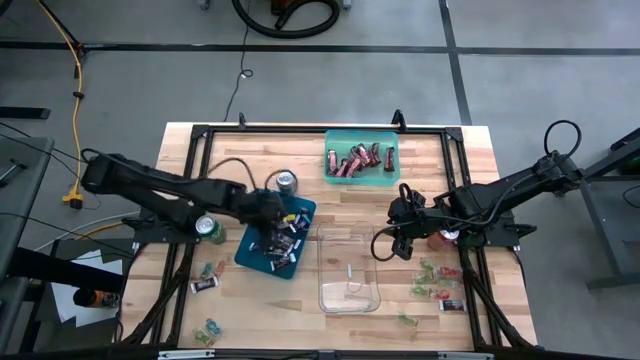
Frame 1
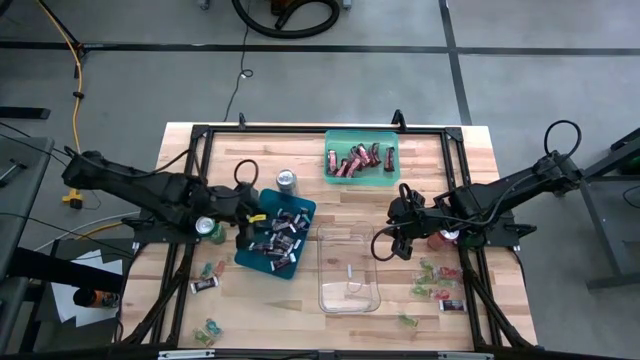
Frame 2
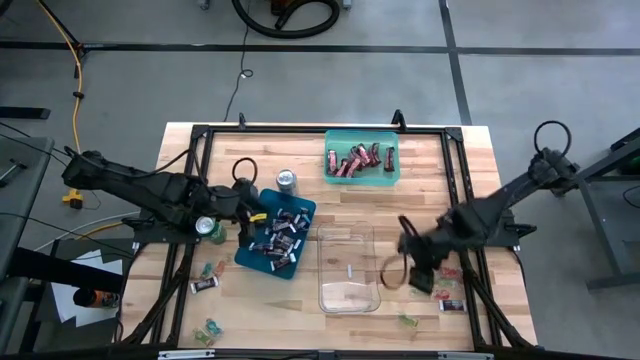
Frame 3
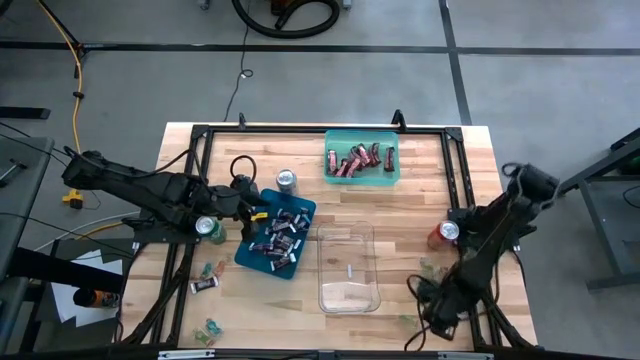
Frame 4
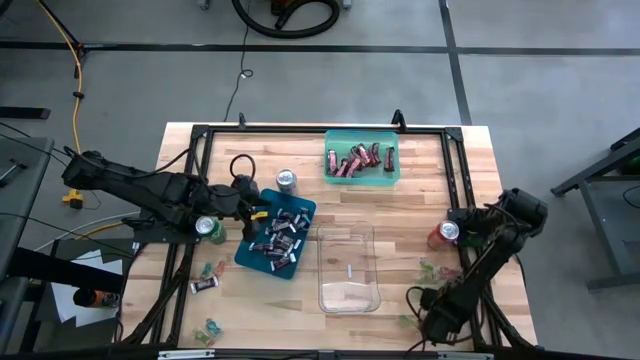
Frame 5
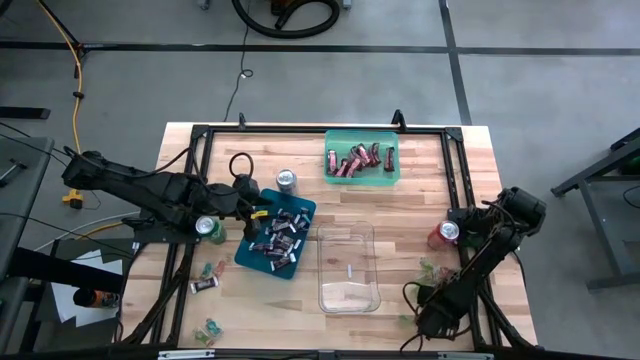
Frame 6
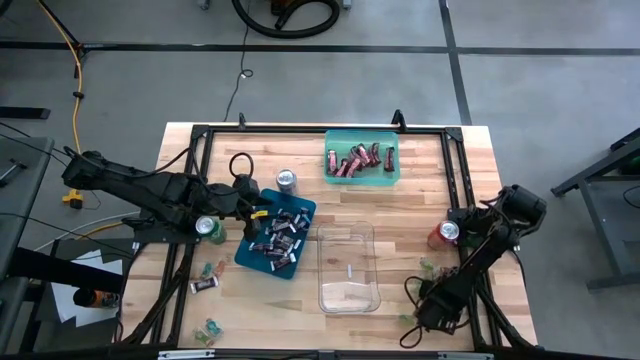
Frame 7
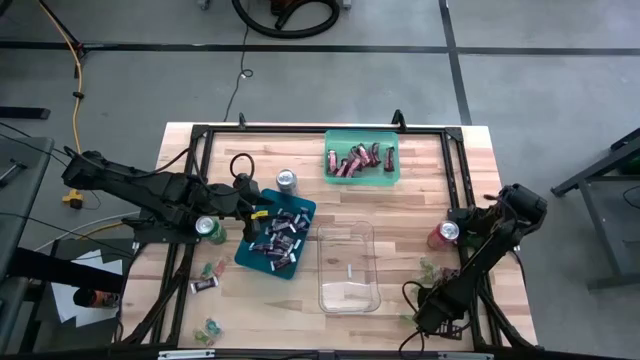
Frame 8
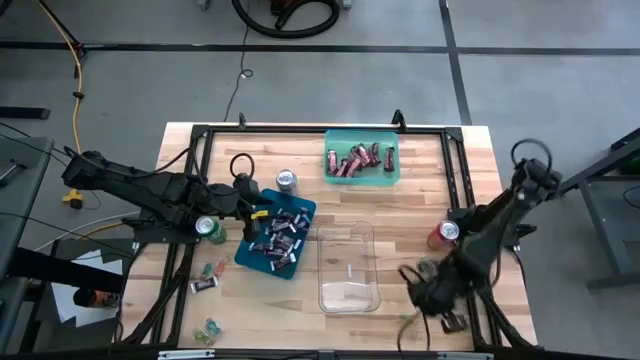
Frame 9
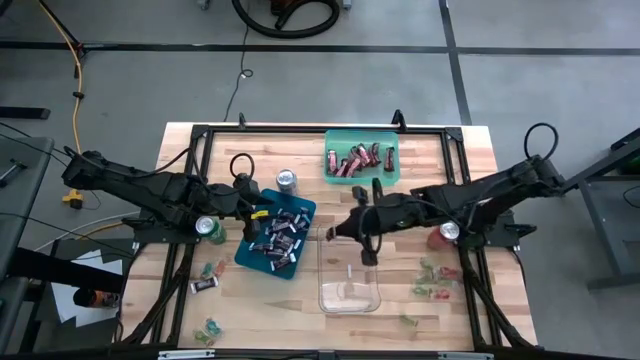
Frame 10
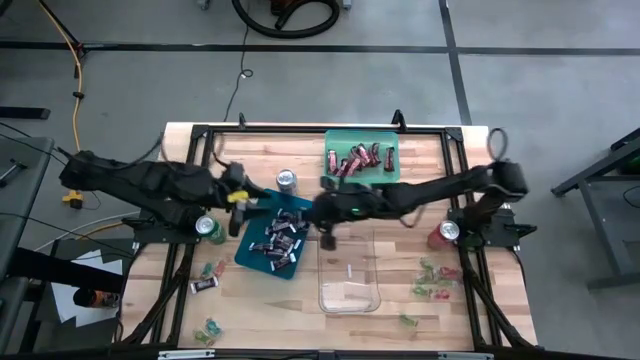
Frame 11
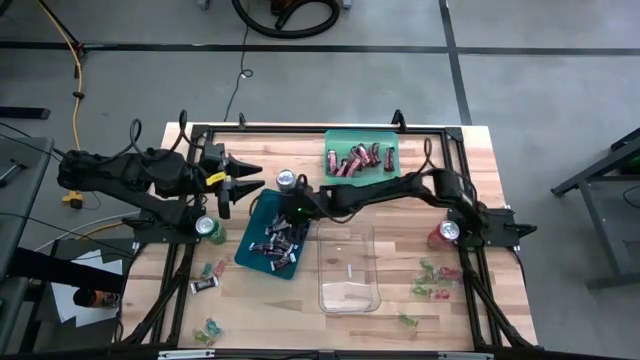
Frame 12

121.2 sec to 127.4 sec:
Task: Sort candy
Put the chocolate bar into the blue bin

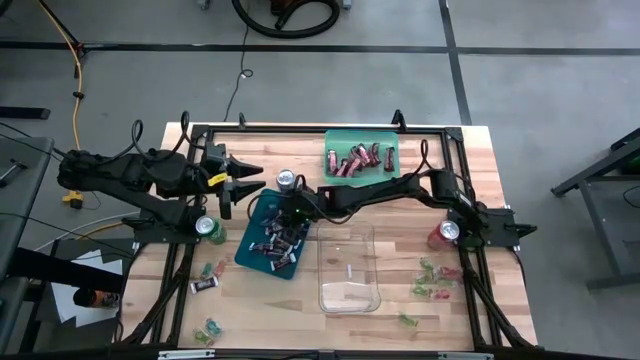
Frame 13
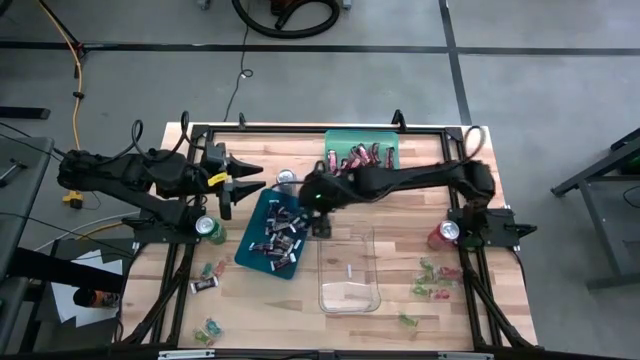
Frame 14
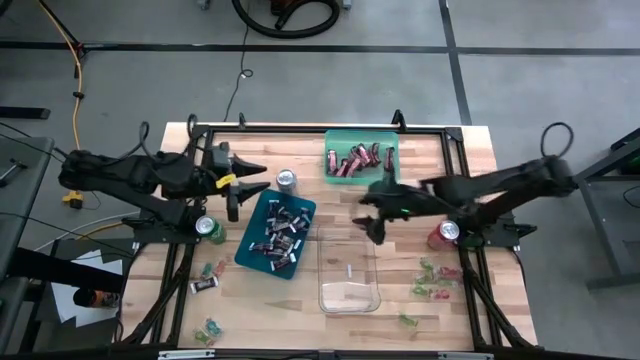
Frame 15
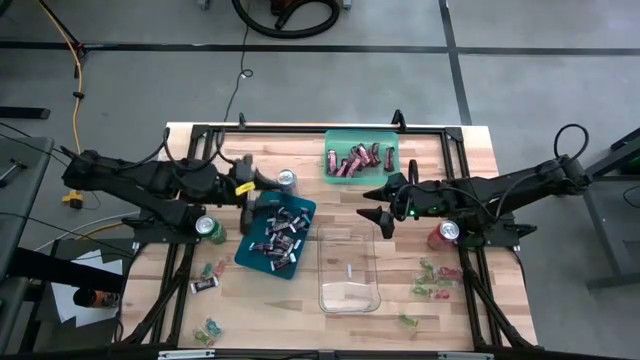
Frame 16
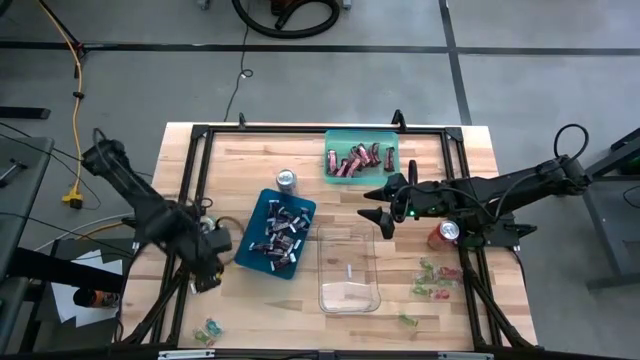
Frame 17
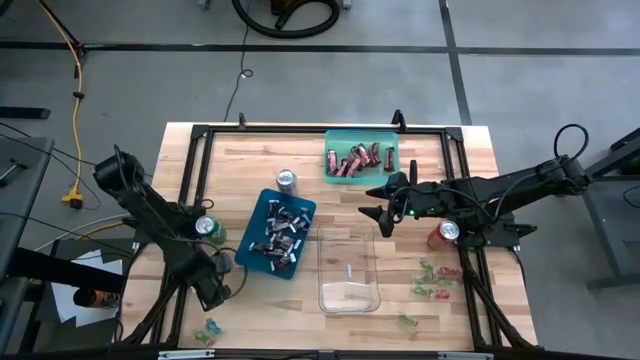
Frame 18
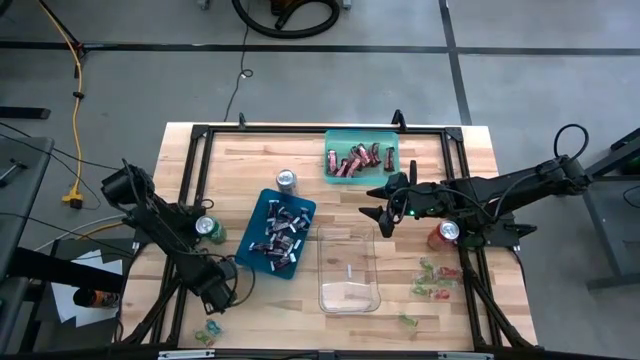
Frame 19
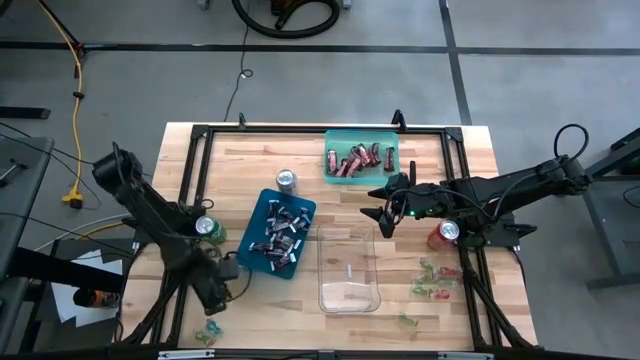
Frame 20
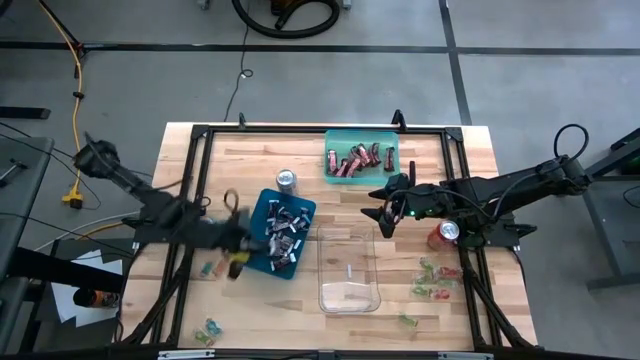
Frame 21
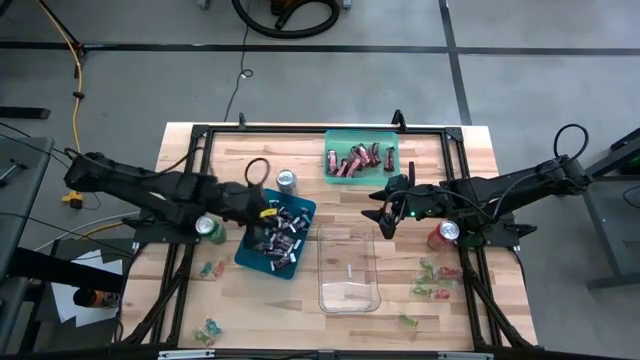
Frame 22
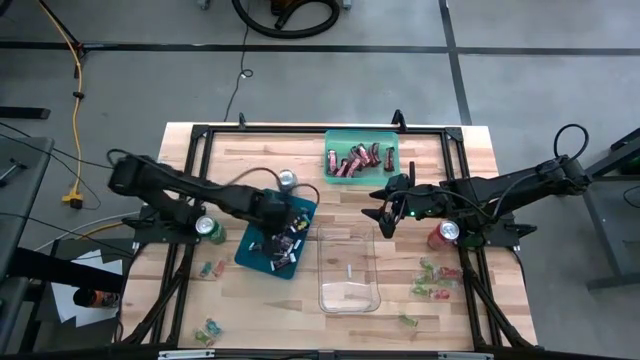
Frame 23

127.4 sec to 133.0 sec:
Put the chocolate bar into the blue bin

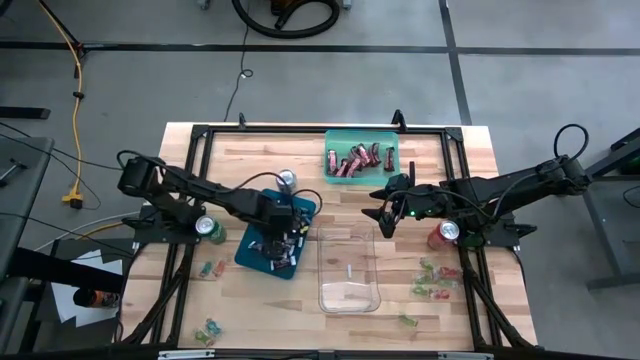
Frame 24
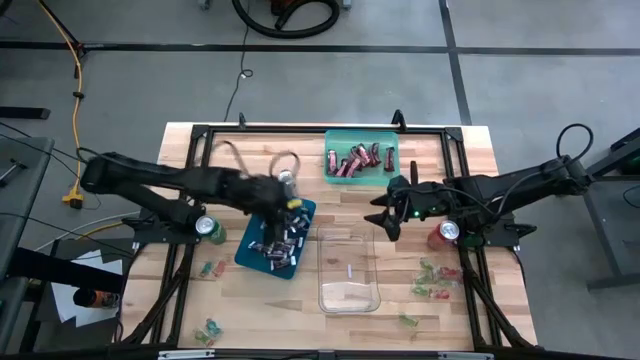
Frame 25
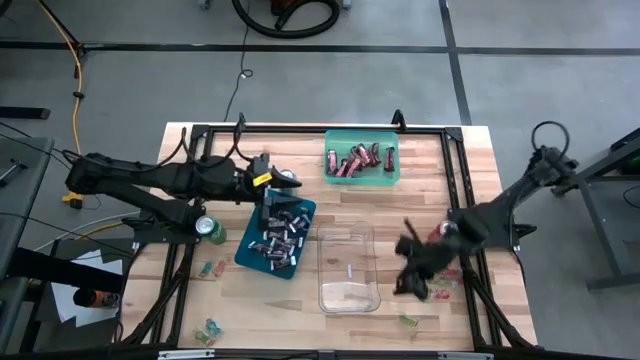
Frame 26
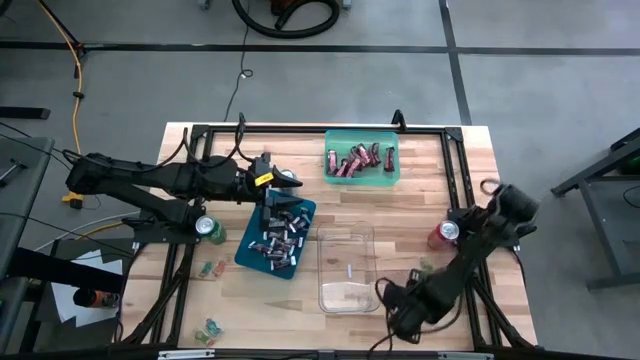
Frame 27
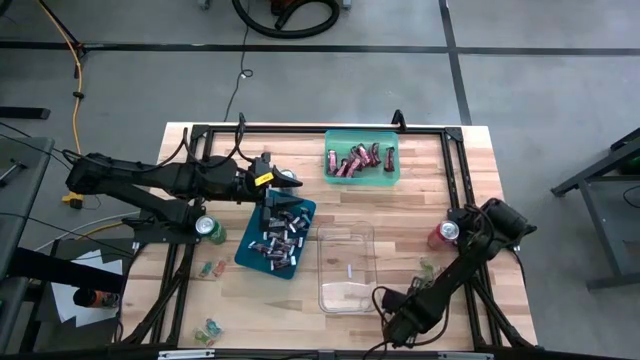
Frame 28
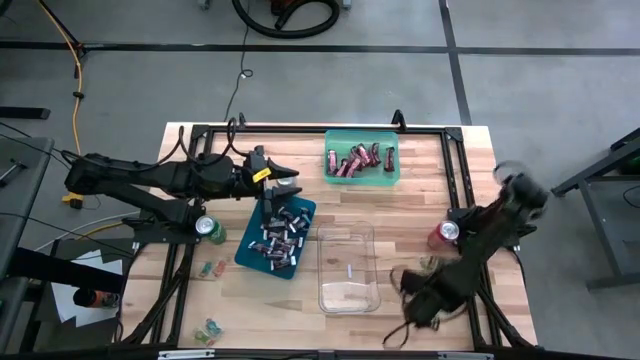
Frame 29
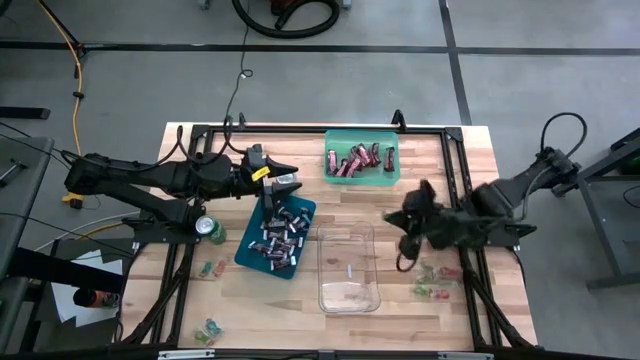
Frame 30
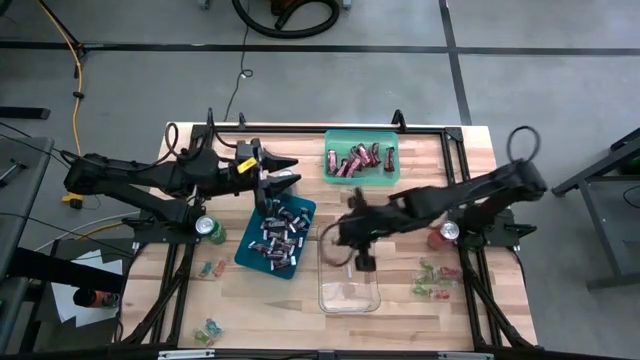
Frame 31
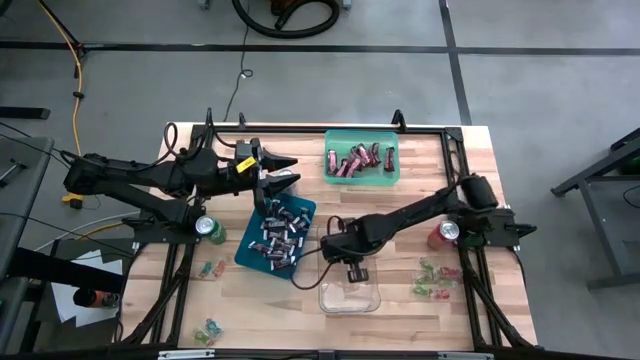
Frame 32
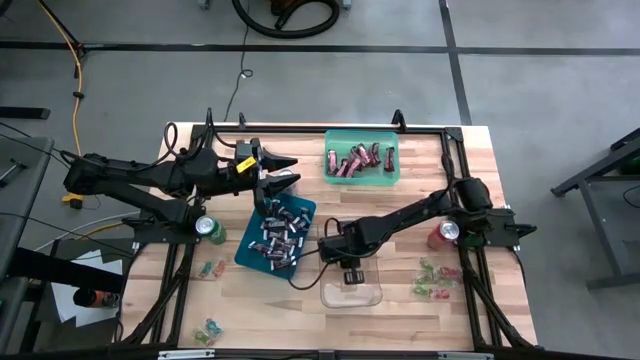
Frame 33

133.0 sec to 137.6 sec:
Put the green candy into the transparent bin

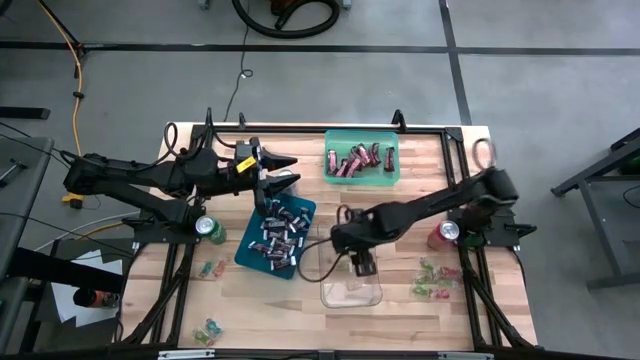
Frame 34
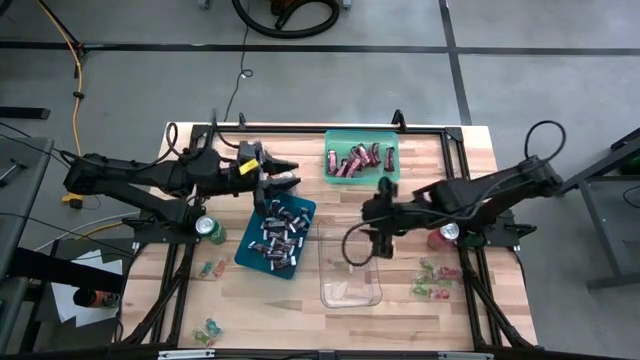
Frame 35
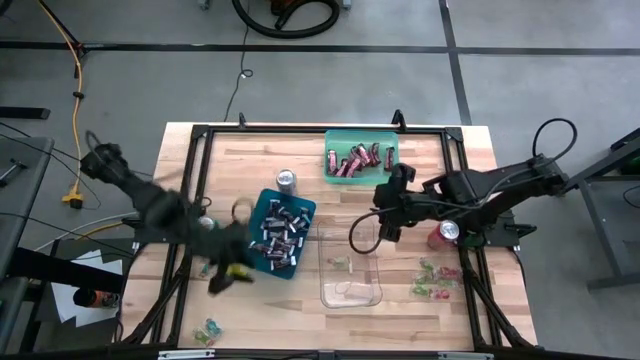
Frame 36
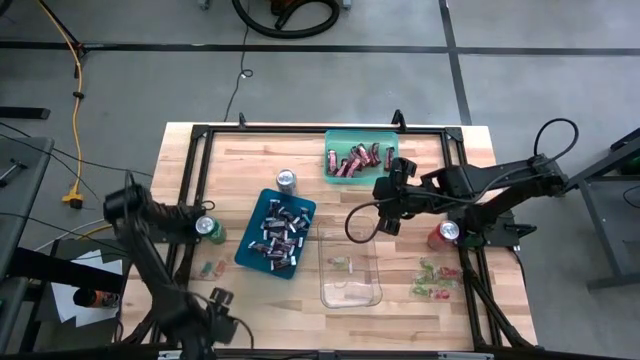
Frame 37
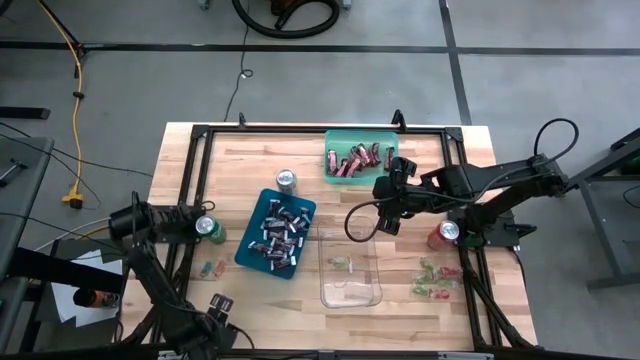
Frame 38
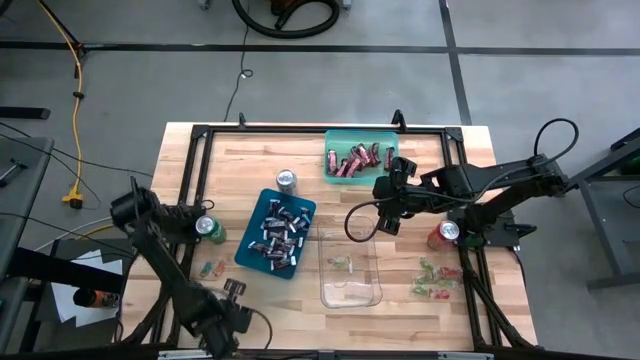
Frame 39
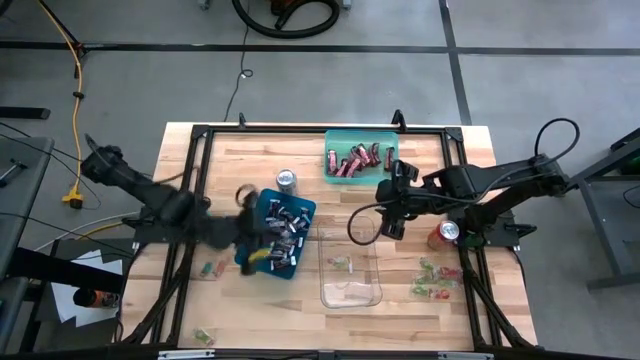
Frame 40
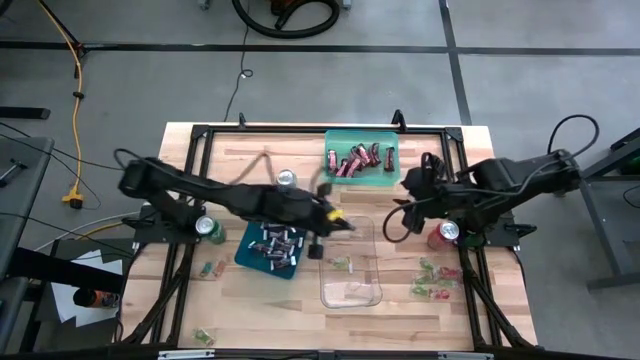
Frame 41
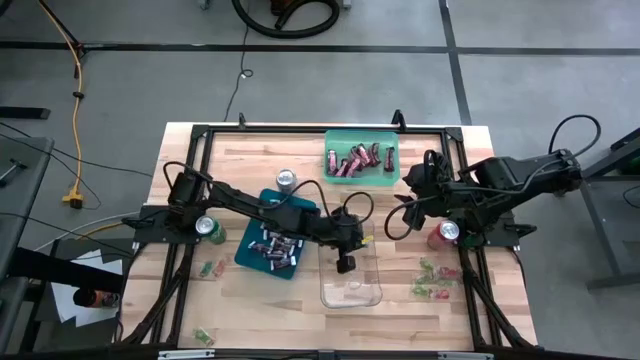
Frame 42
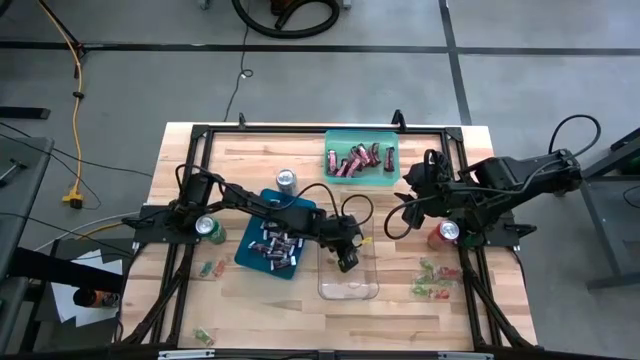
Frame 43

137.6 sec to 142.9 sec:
Put the blue candy into the transparent bin
